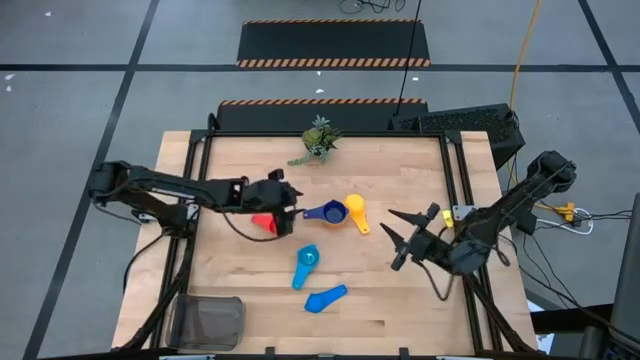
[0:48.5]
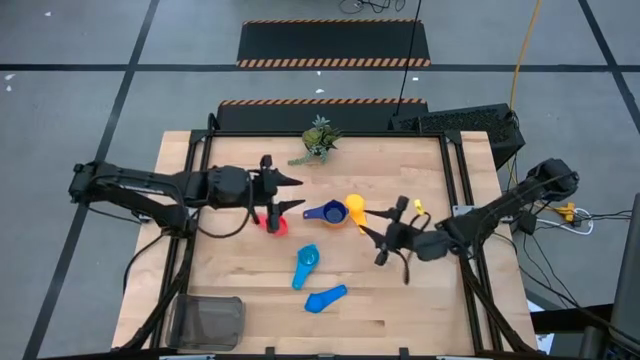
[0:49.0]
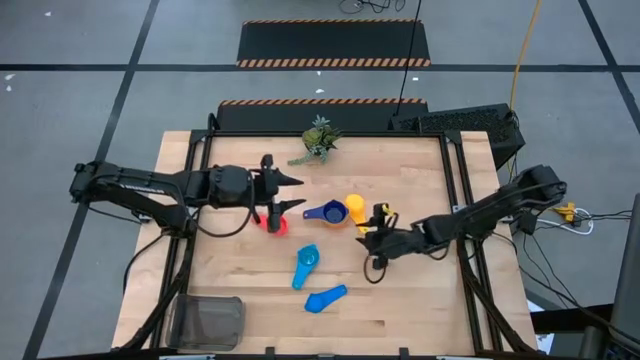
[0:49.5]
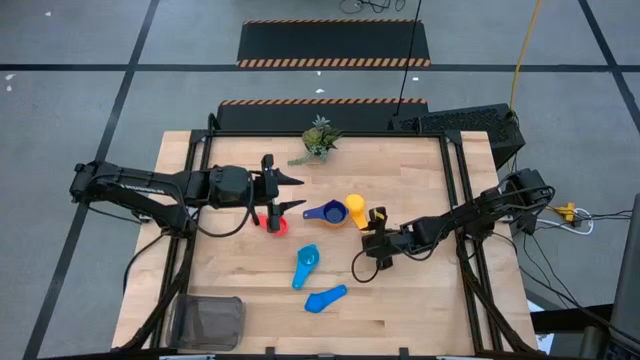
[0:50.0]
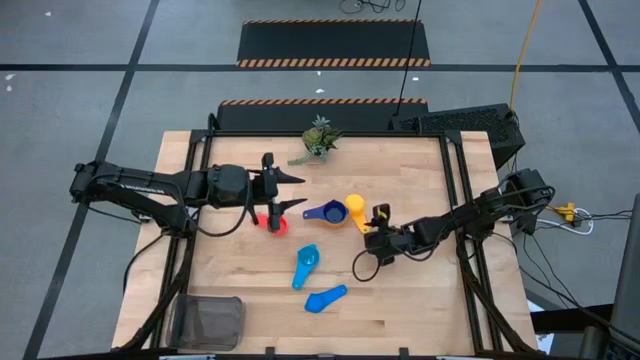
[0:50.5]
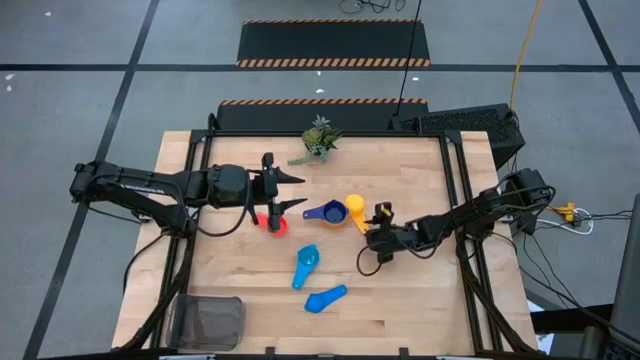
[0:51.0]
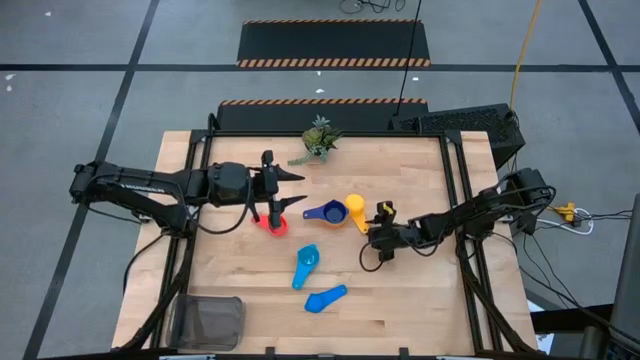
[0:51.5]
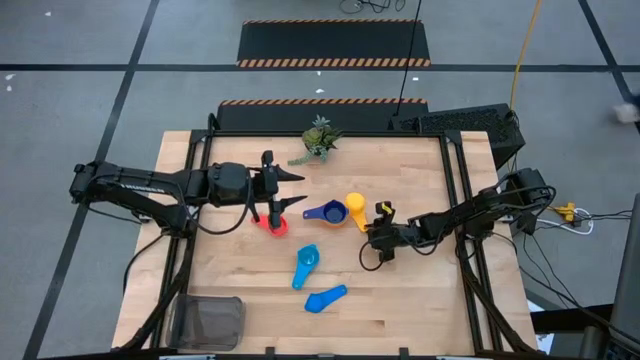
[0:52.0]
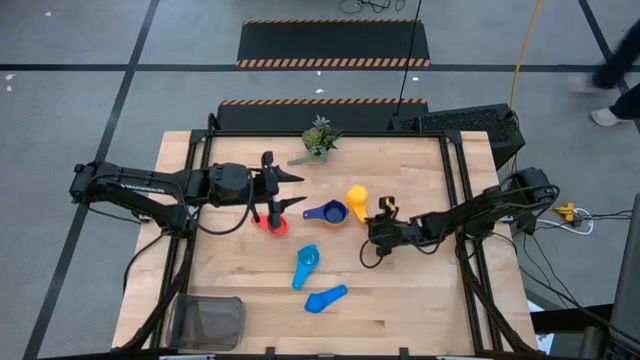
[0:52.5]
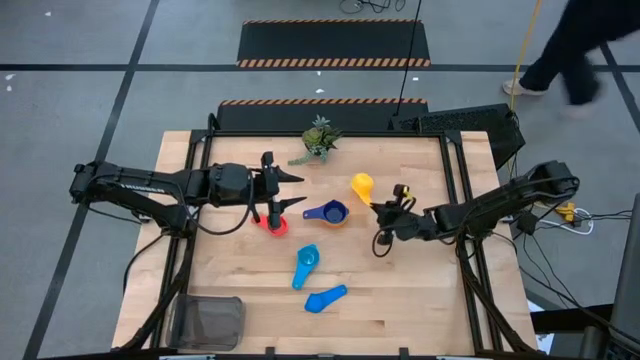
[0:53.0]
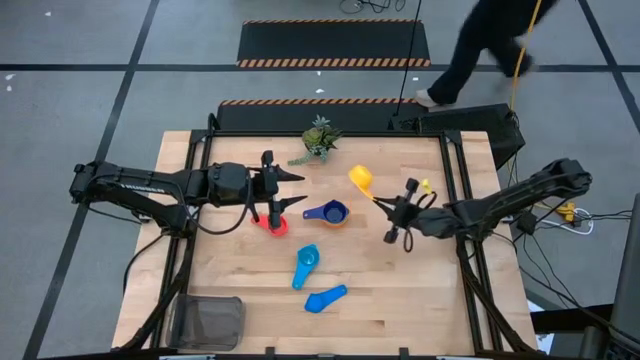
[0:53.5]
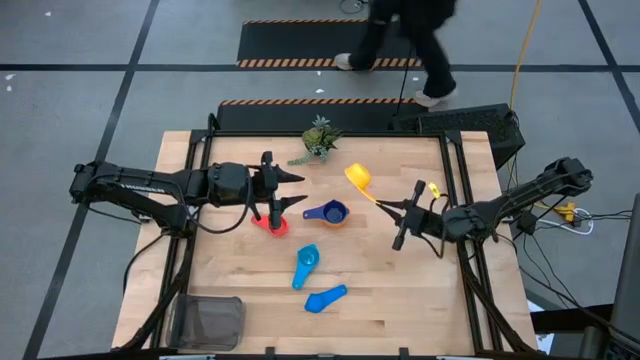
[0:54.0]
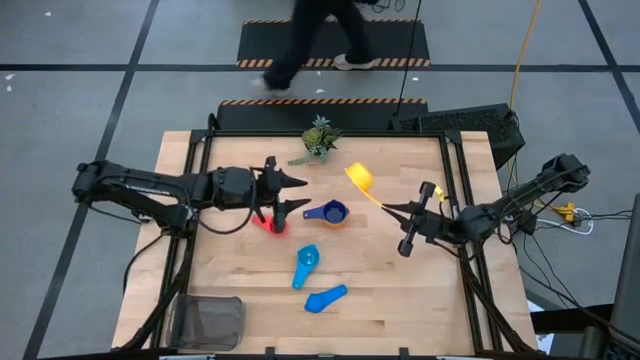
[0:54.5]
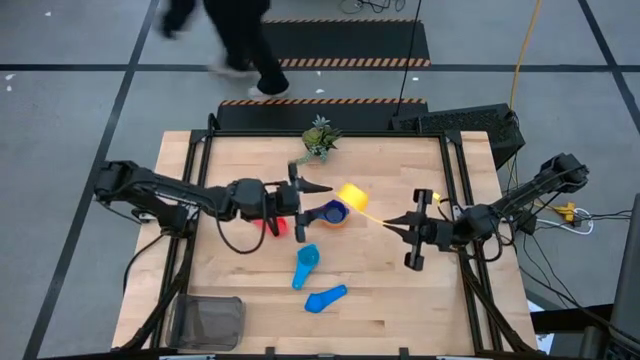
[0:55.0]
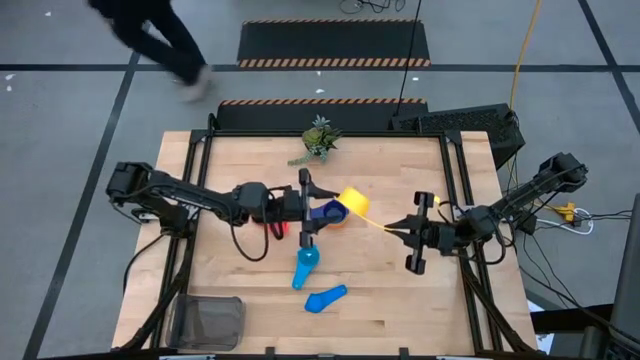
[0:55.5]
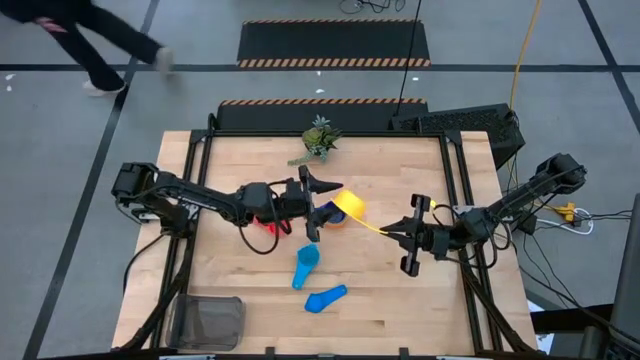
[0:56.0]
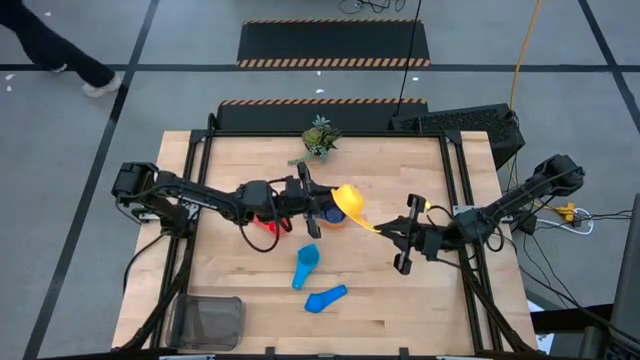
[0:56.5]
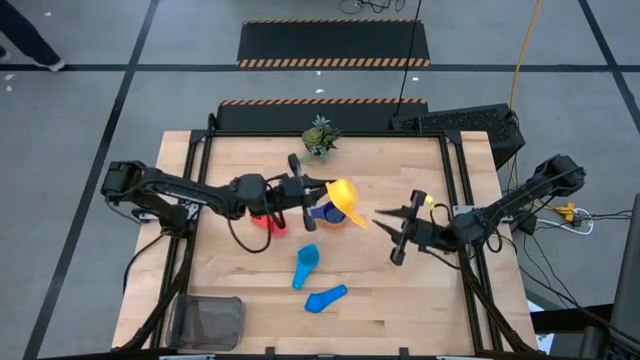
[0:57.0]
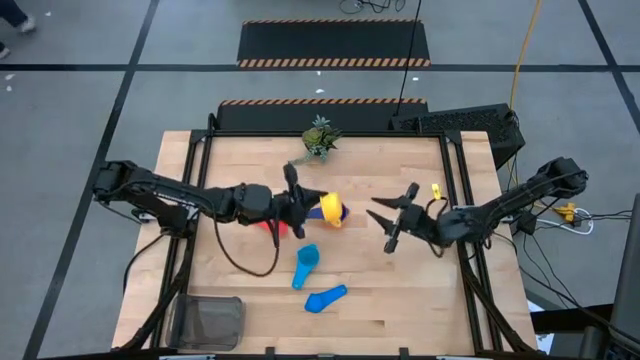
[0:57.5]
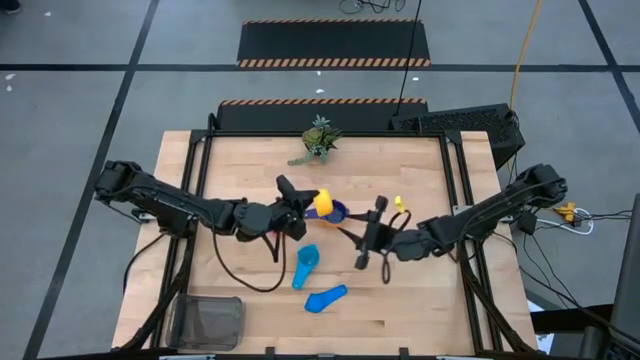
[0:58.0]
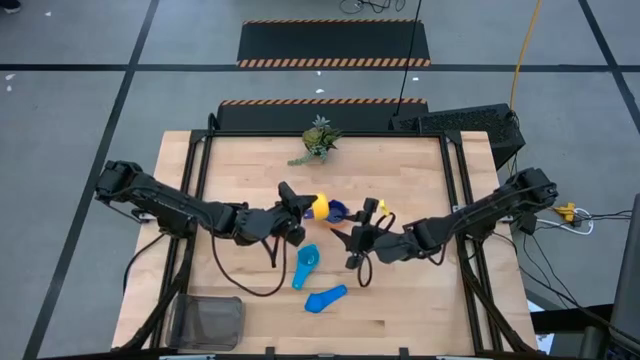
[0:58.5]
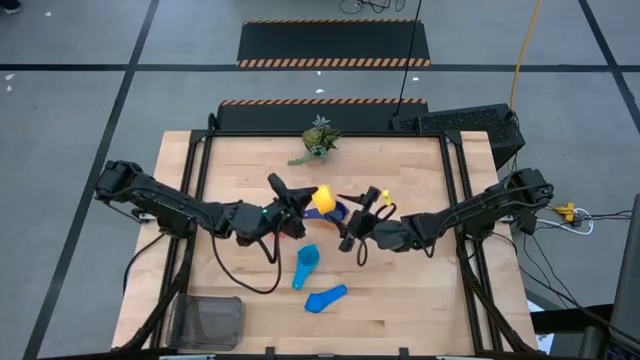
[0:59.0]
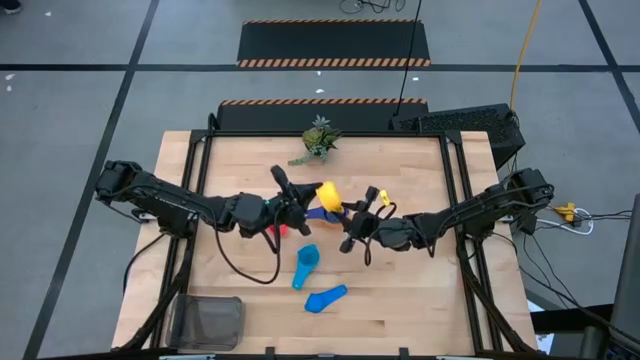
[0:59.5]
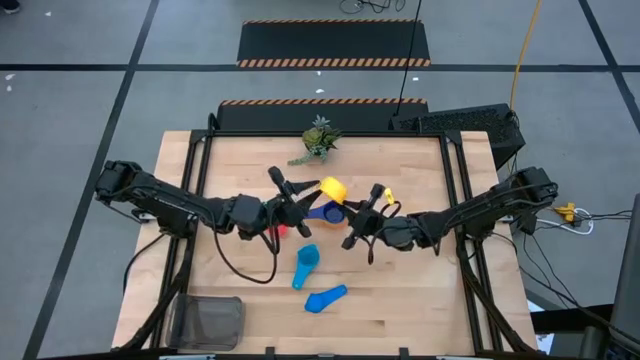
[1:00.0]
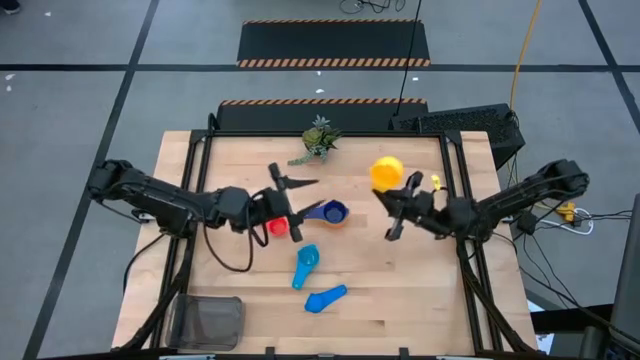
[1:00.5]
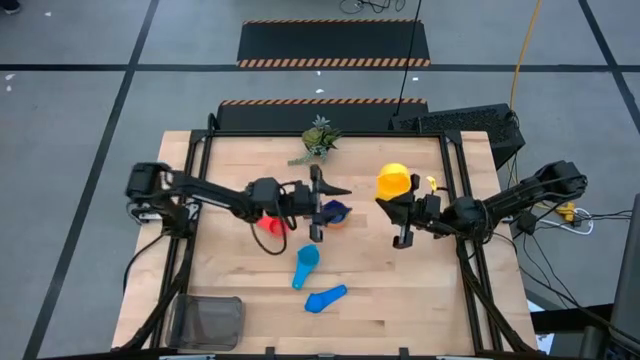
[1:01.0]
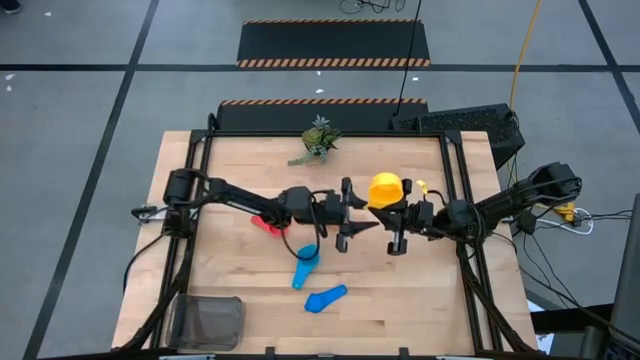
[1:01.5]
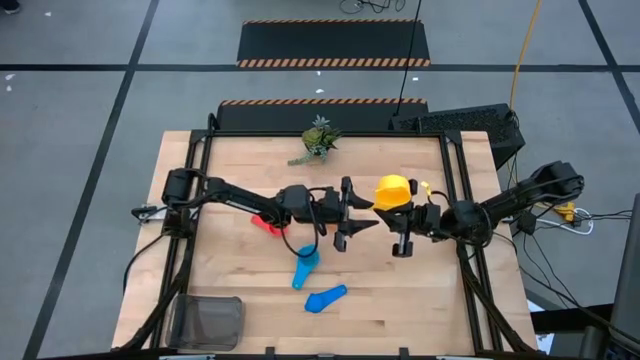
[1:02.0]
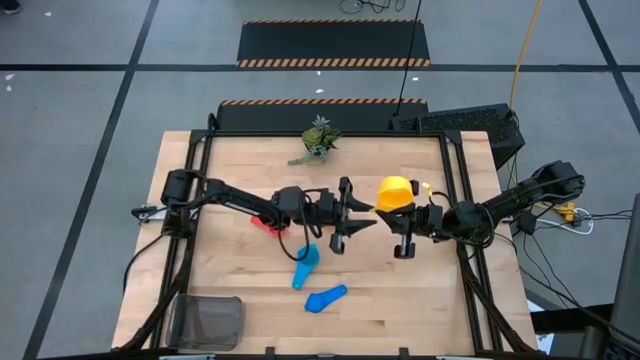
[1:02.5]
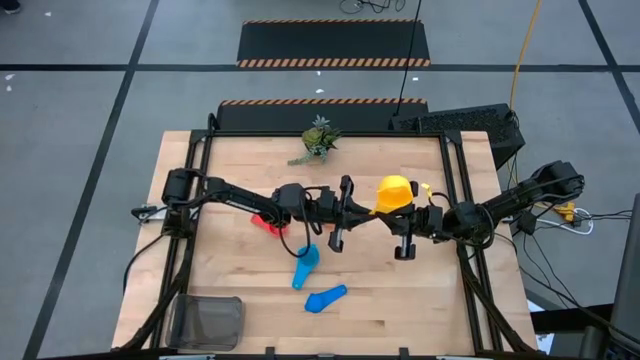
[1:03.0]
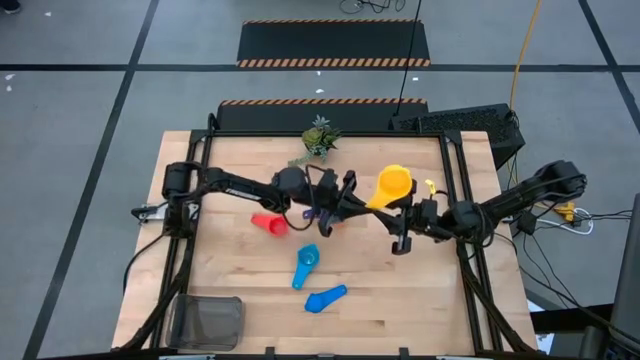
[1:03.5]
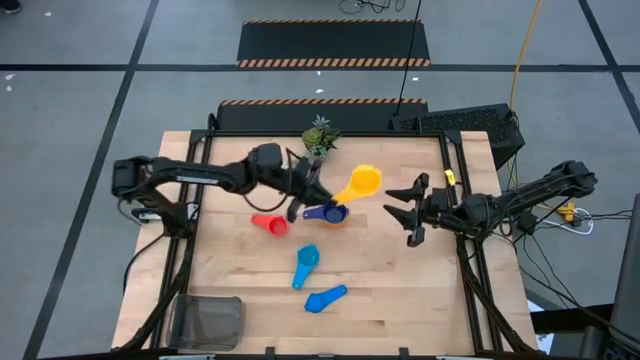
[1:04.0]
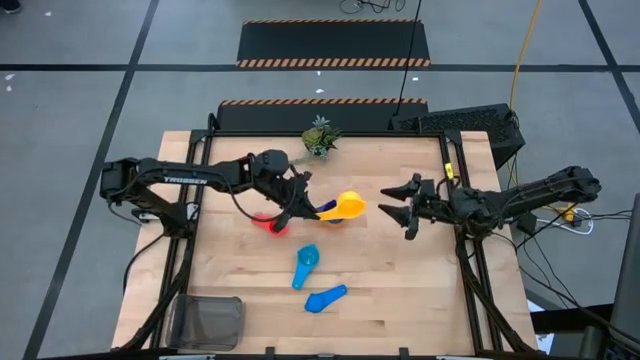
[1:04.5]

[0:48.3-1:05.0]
Task: Nest measuring cups in basket
Stack the yellow measuring cup on top of the dark blue measuring cup

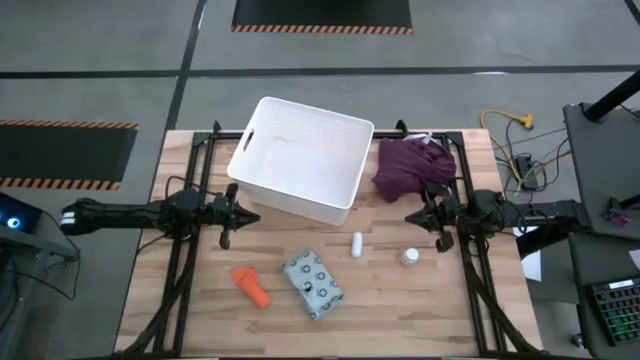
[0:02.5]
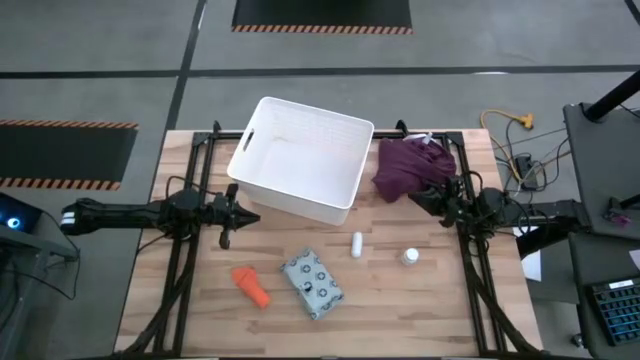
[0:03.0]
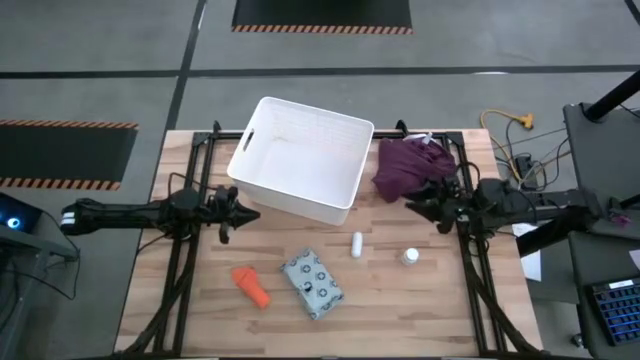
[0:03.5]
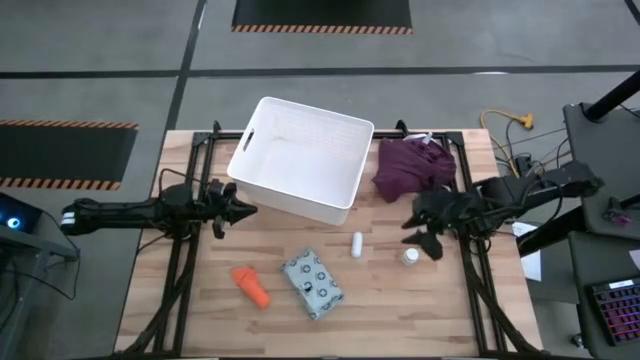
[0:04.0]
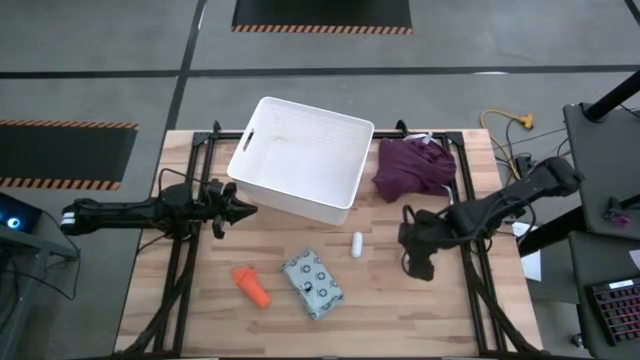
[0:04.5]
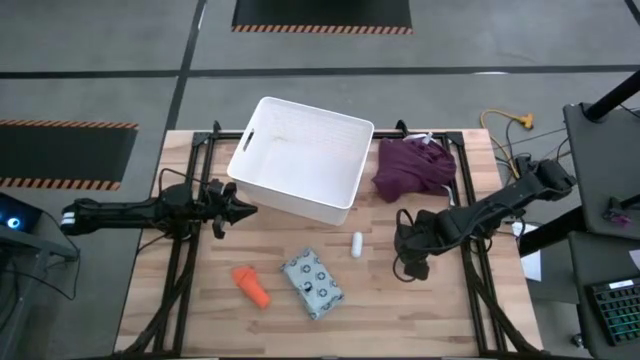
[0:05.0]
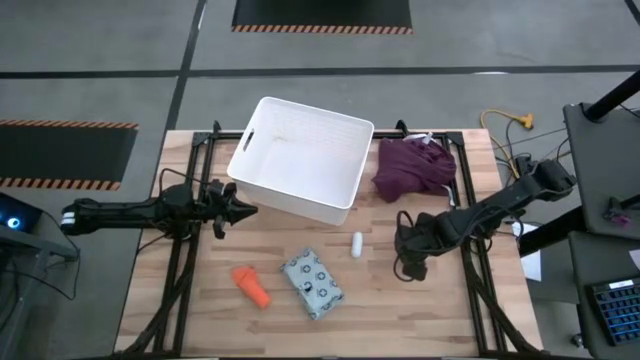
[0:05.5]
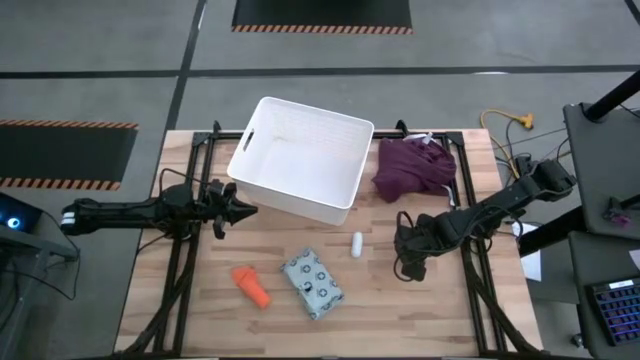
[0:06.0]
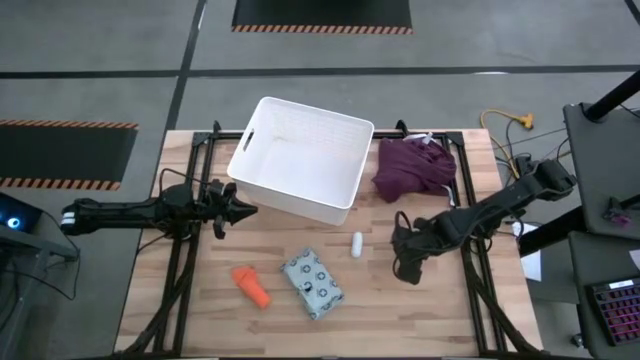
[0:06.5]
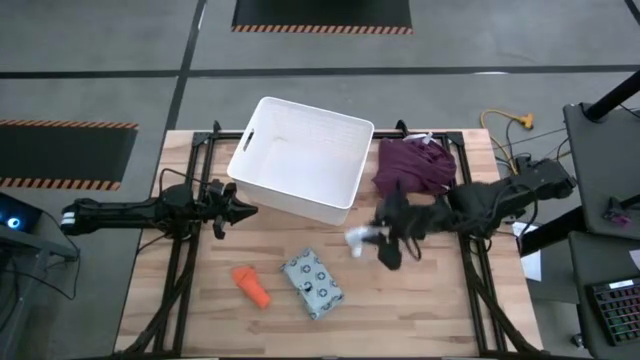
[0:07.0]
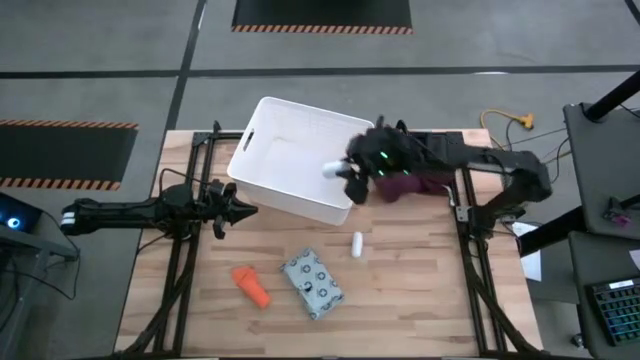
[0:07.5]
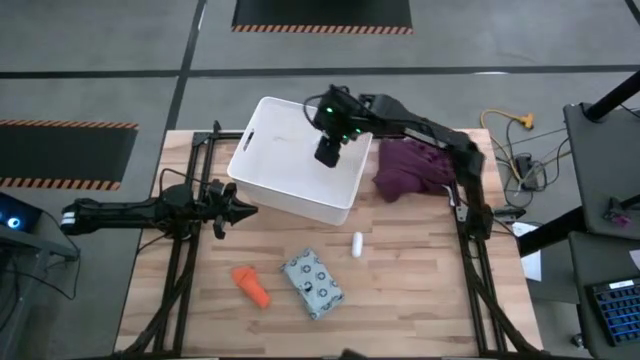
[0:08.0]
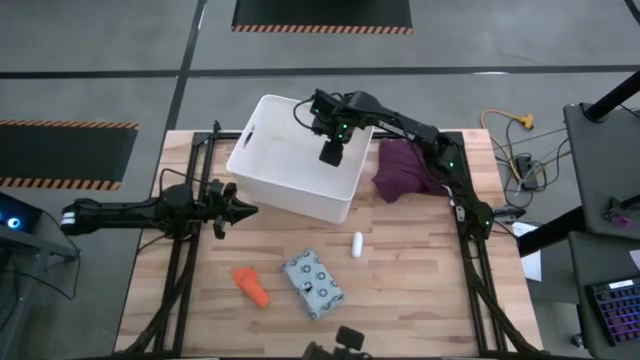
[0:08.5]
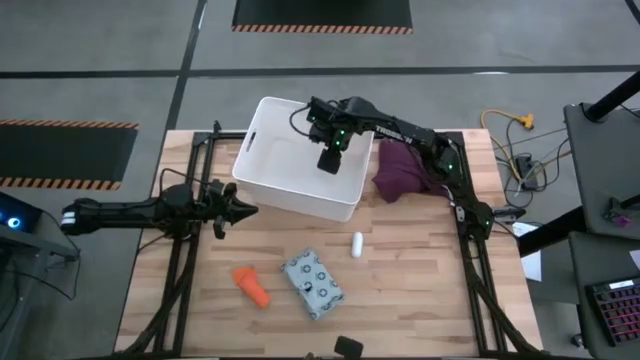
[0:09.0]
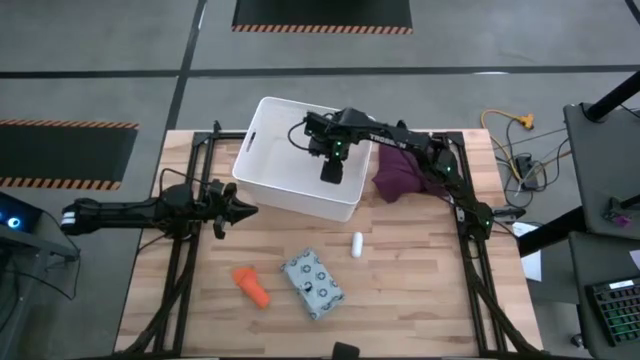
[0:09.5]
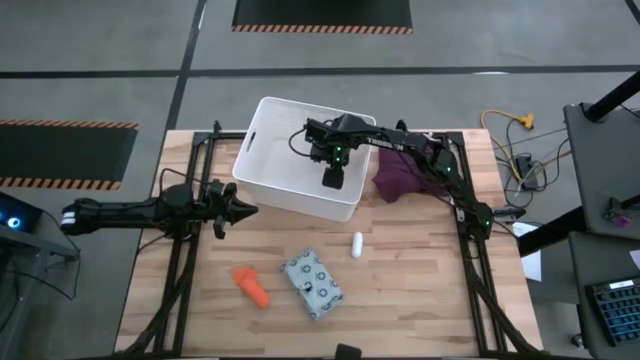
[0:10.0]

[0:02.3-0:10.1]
Task: Pick & place medical supplies in basket/bin
Put the pill bottle into the bin
